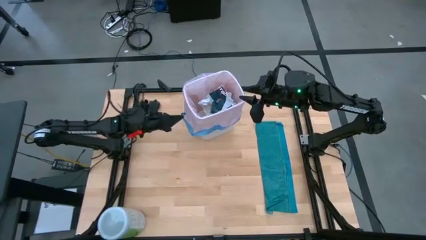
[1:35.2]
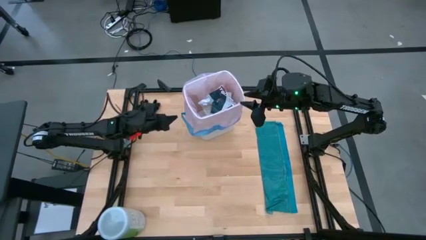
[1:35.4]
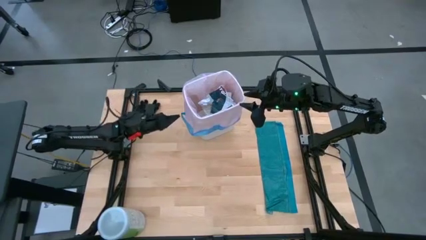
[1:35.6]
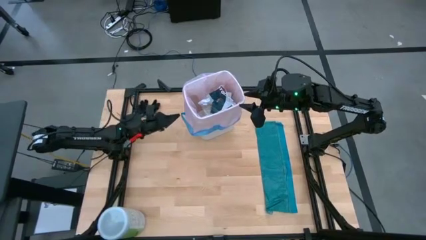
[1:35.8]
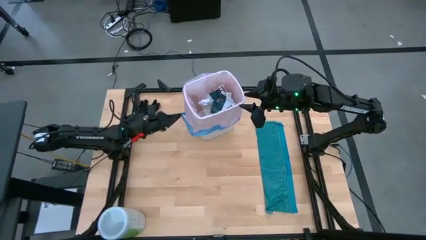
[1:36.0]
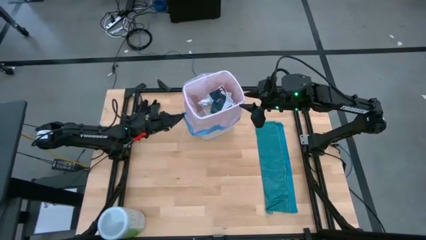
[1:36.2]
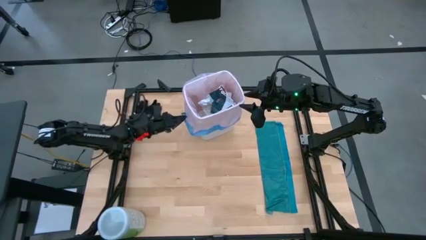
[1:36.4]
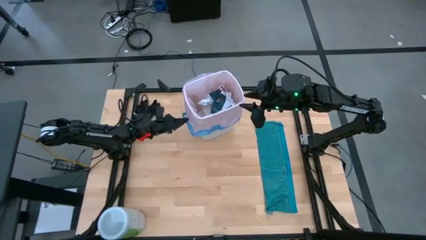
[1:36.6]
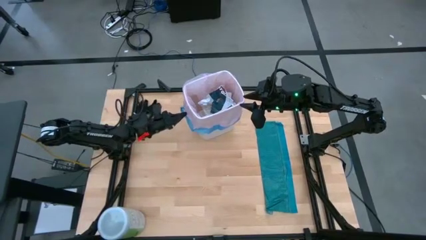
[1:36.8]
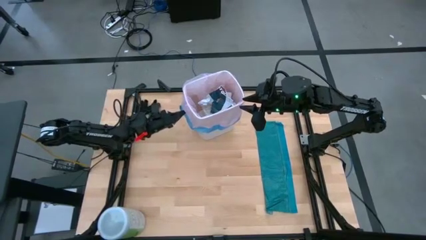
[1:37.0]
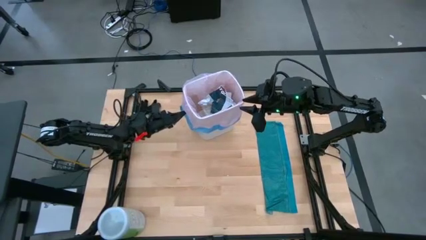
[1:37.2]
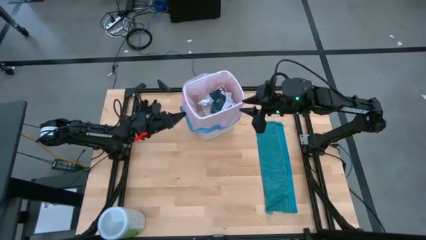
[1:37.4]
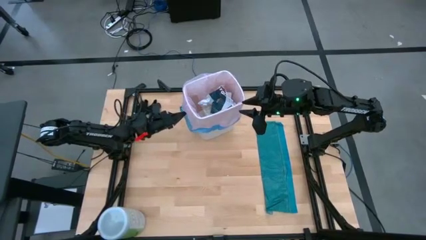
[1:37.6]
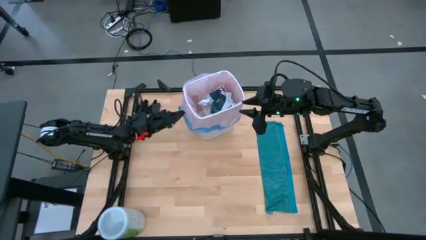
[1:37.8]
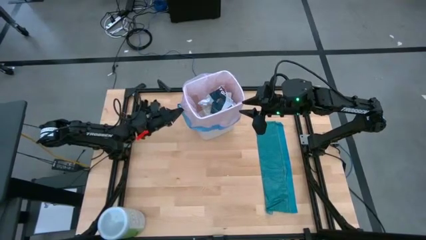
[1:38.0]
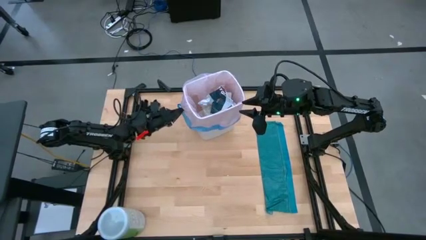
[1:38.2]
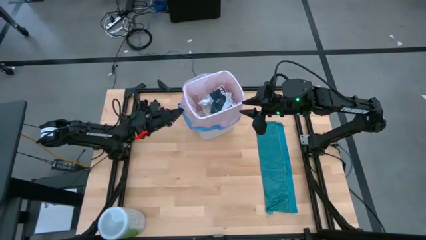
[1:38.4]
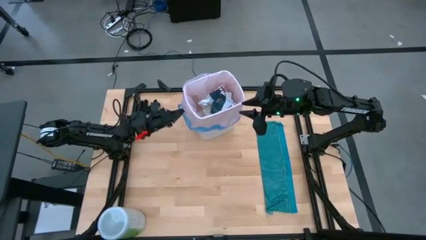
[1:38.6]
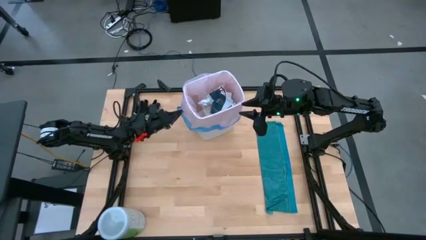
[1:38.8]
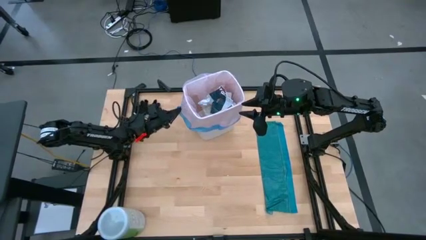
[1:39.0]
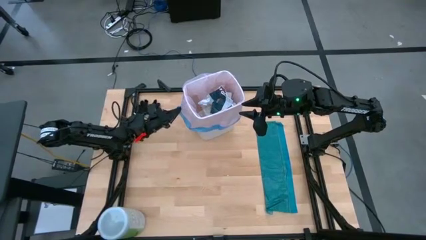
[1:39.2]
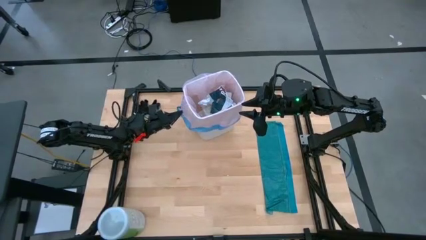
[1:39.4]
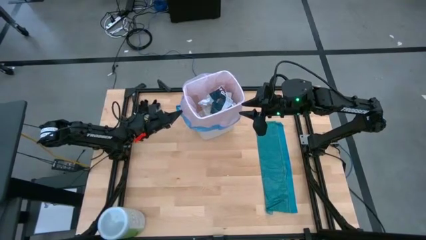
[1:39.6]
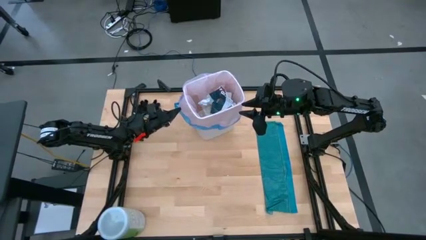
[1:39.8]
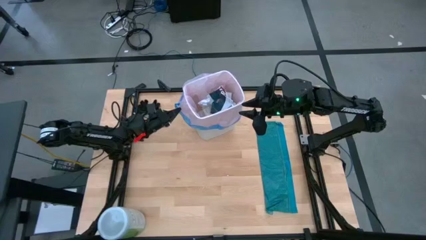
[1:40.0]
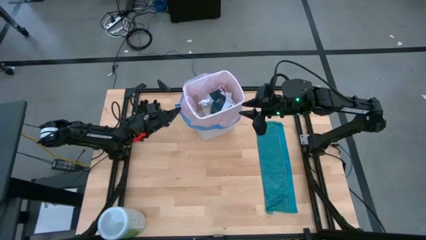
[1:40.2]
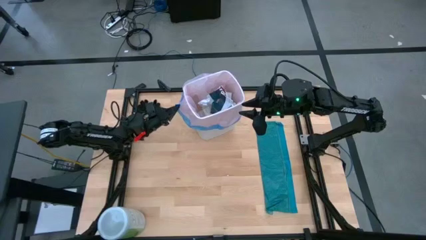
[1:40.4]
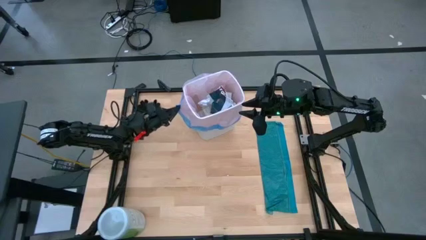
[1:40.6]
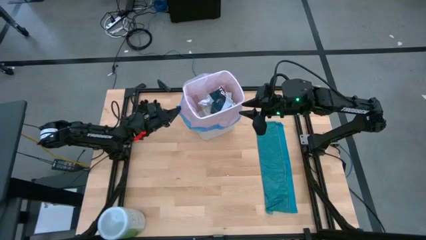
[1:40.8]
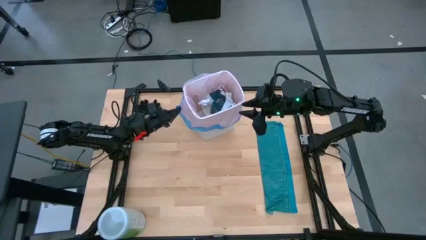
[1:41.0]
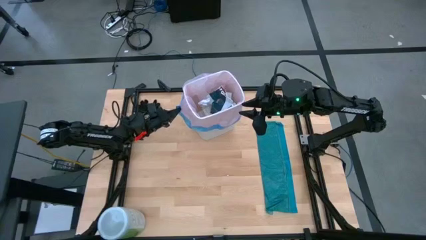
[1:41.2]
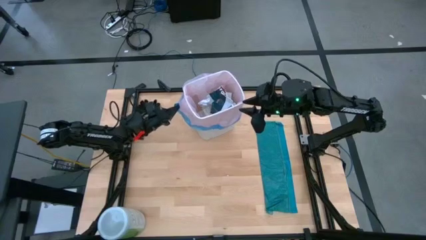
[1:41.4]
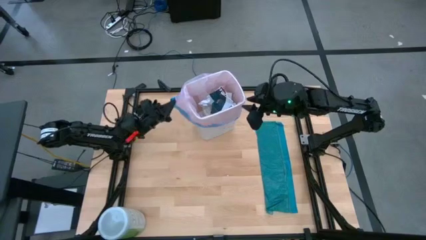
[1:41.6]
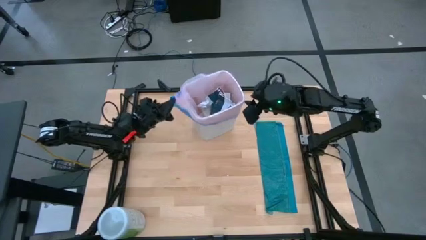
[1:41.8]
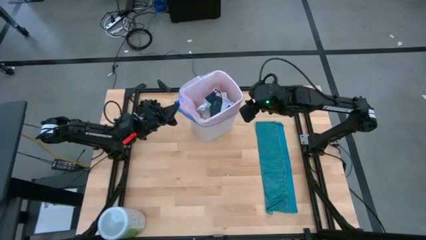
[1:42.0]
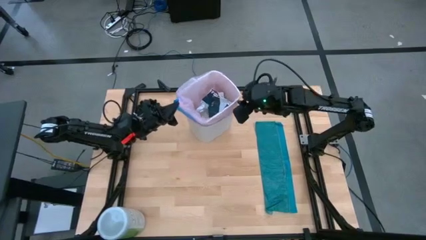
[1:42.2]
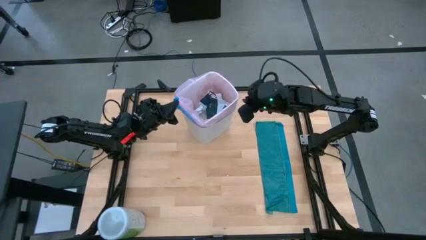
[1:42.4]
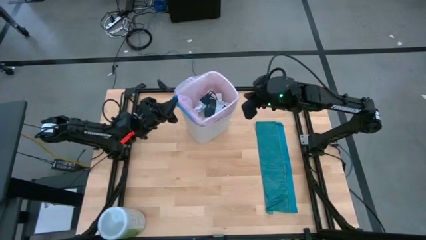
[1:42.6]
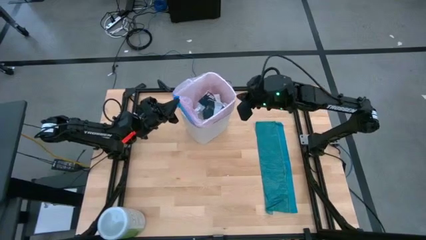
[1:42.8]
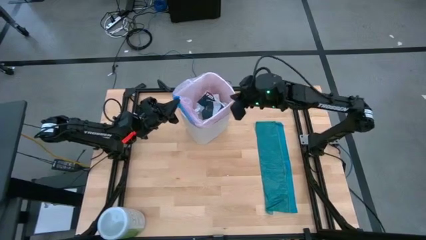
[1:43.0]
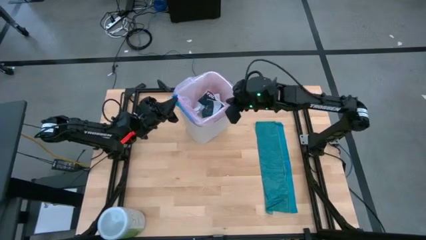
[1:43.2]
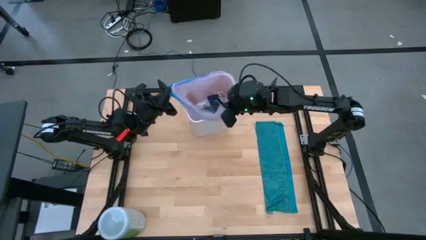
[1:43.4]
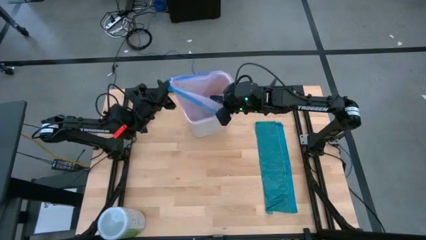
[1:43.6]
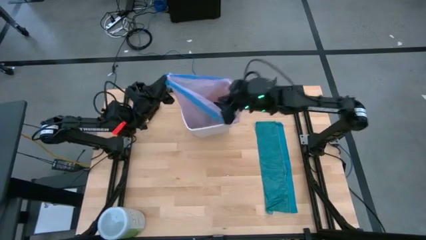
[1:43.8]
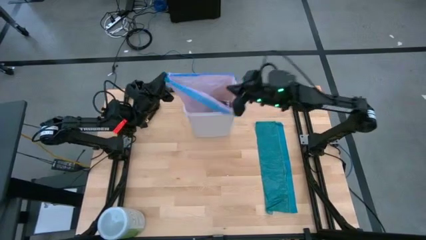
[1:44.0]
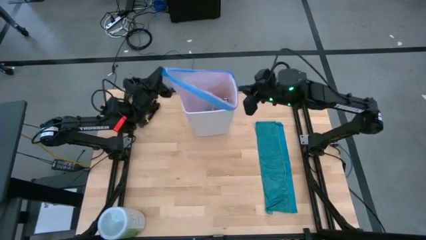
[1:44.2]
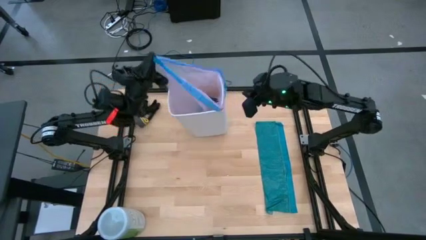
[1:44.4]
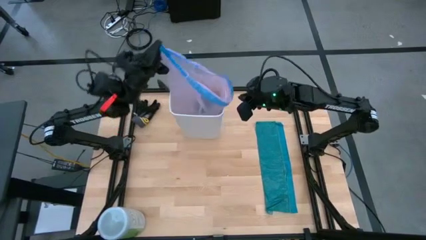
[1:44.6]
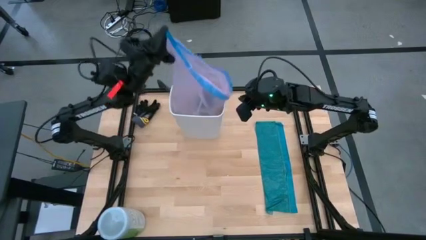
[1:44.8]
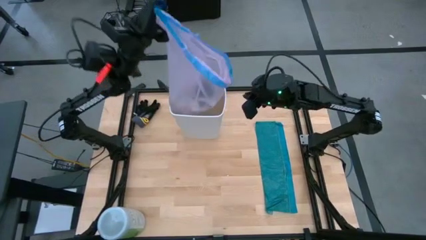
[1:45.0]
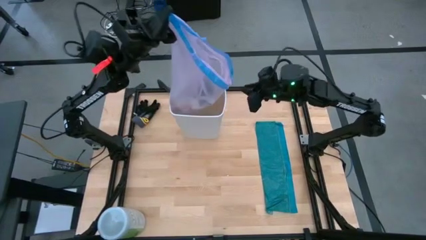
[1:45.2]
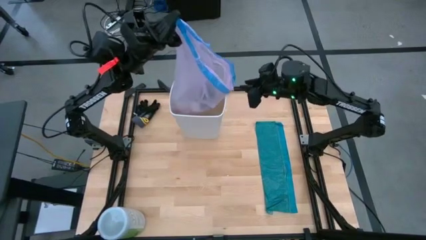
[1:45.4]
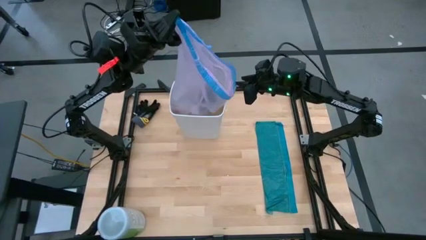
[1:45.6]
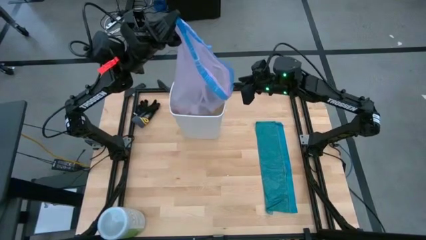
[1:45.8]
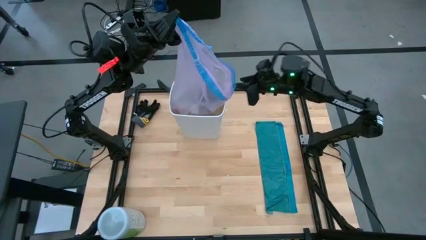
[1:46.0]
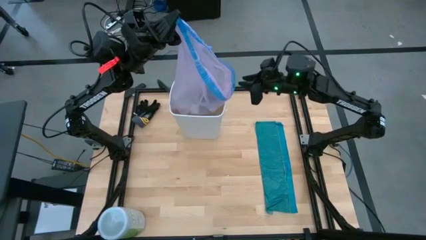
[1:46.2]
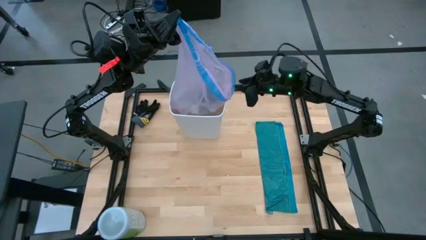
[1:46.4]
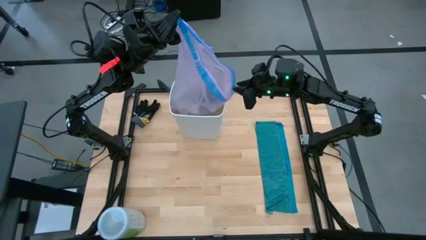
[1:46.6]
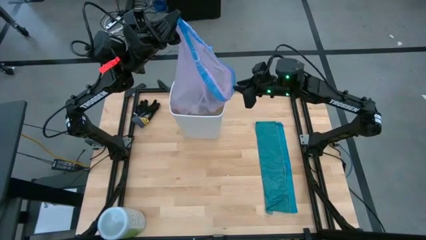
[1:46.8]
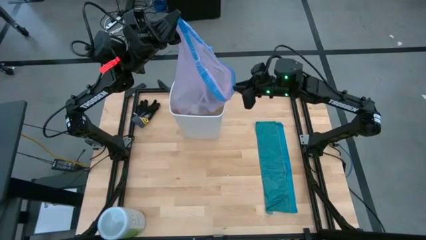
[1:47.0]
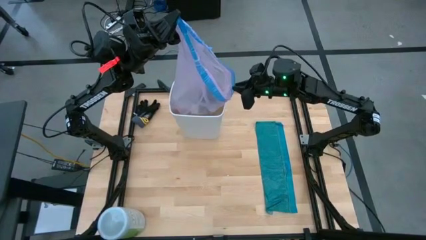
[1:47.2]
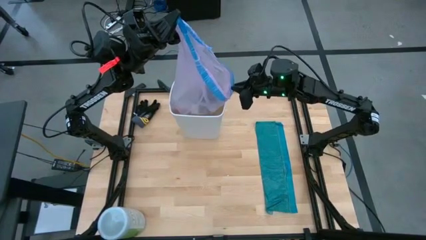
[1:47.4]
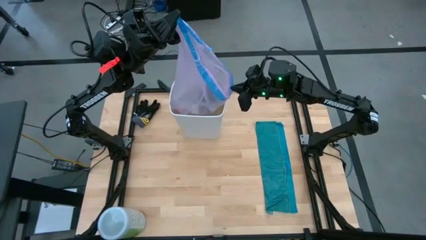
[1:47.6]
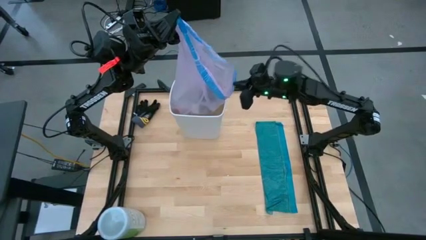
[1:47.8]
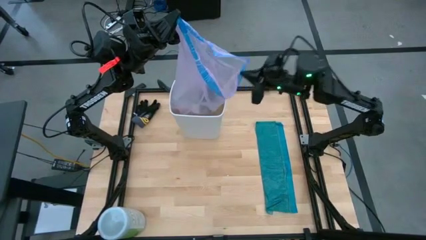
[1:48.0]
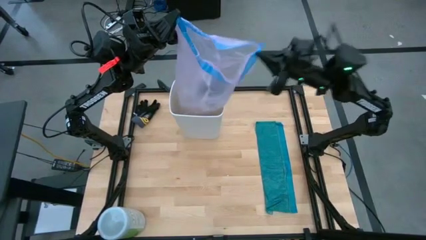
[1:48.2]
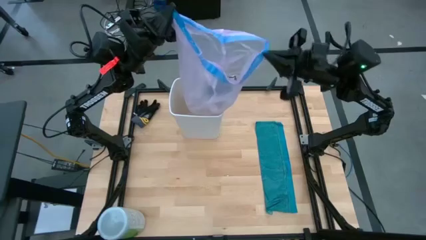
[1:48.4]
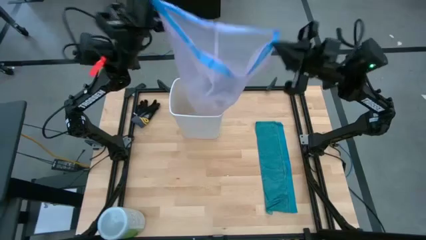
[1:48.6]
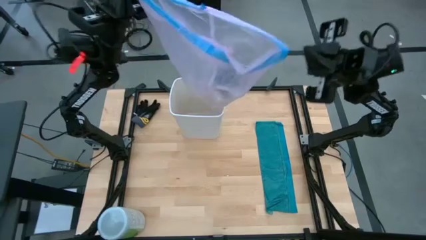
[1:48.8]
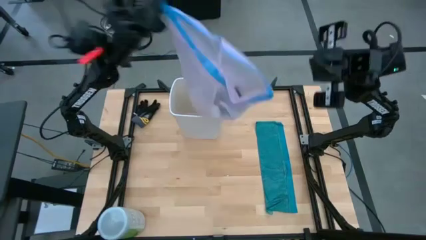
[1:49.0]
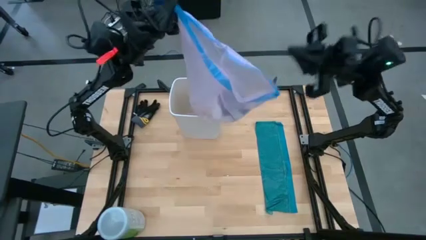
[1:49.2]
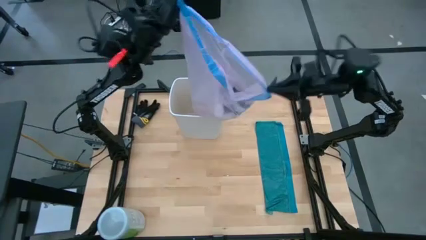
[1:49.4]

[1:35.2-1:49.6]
Task: place trash/remove bag and relplace
Remove the trash bag from the white trash bin
